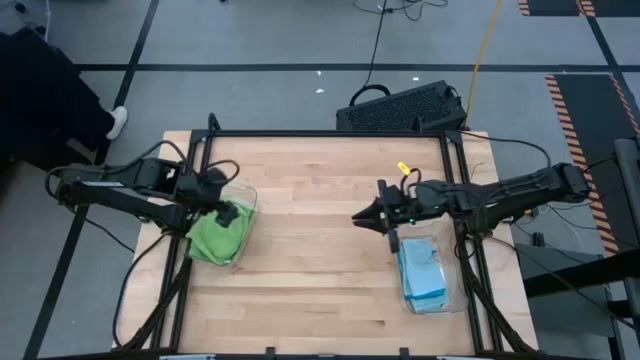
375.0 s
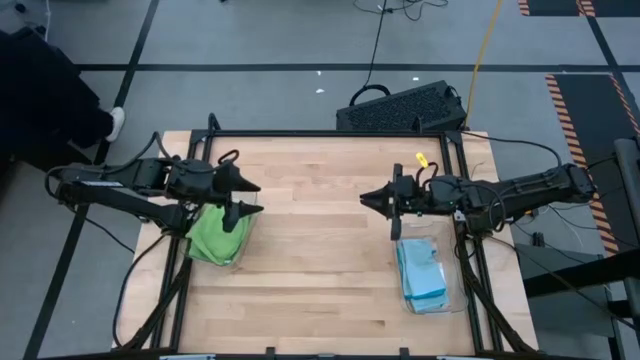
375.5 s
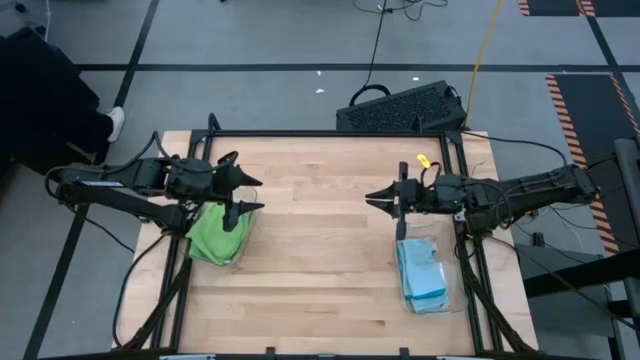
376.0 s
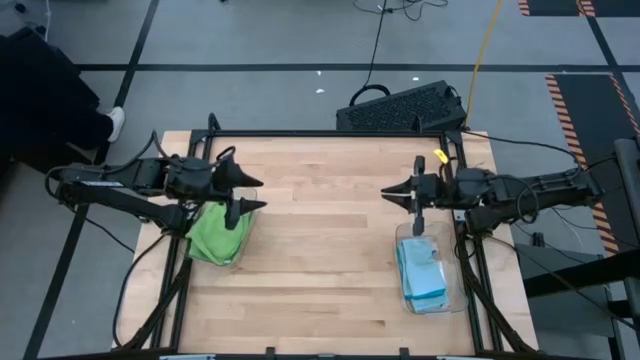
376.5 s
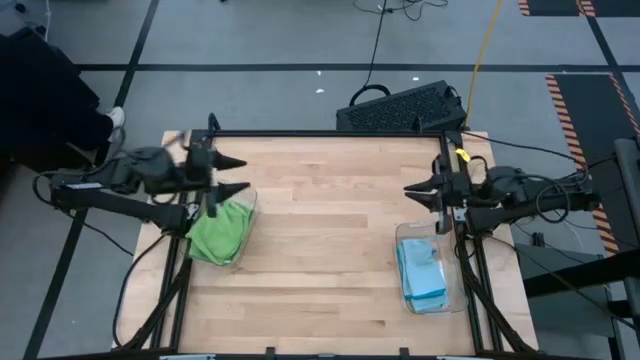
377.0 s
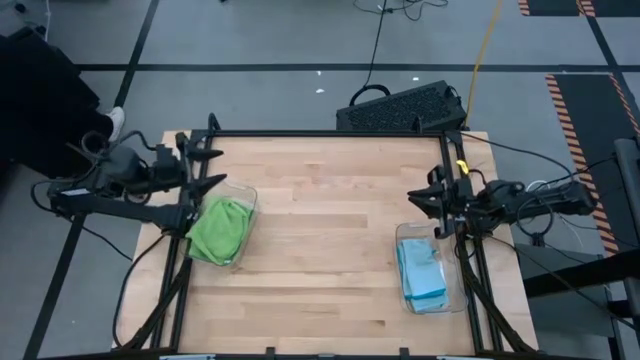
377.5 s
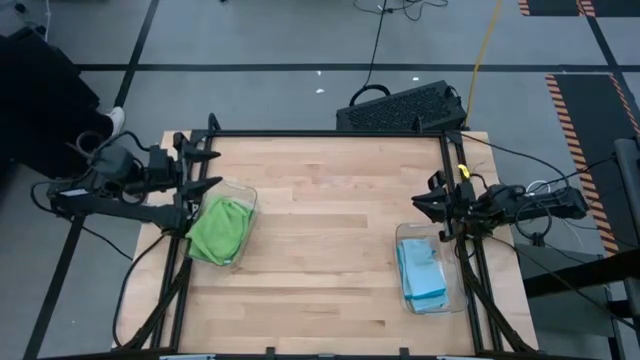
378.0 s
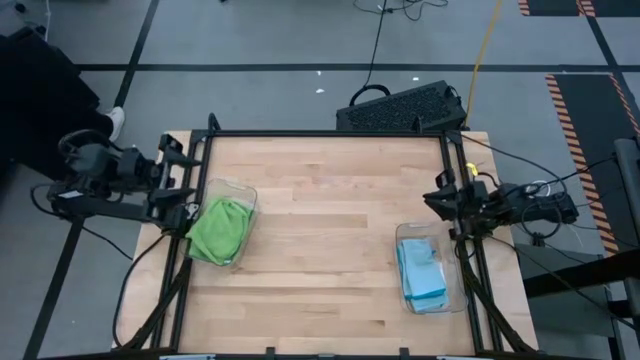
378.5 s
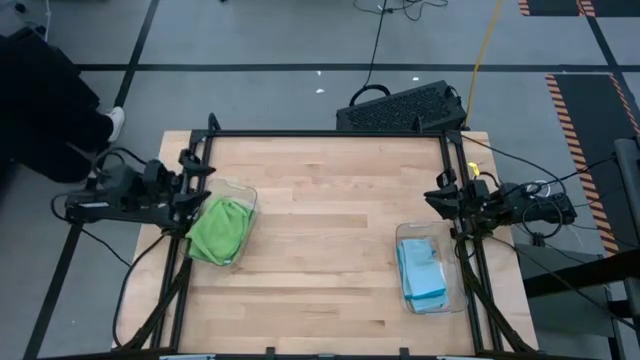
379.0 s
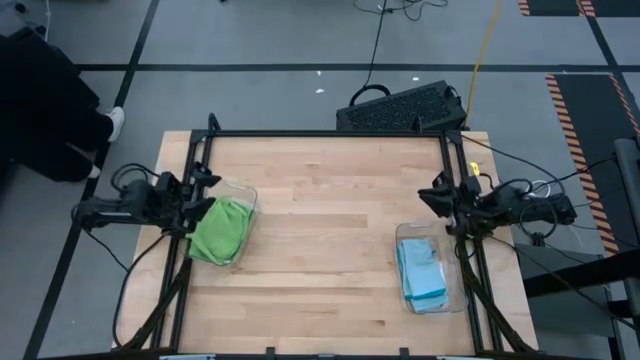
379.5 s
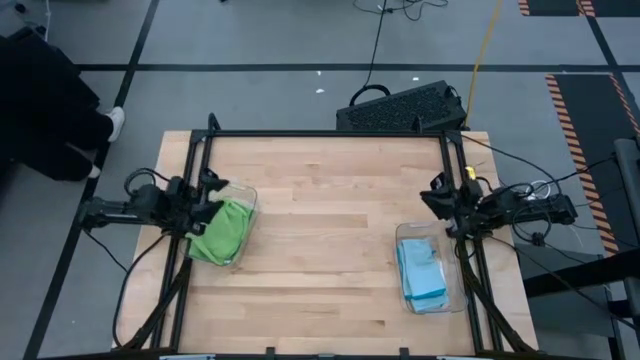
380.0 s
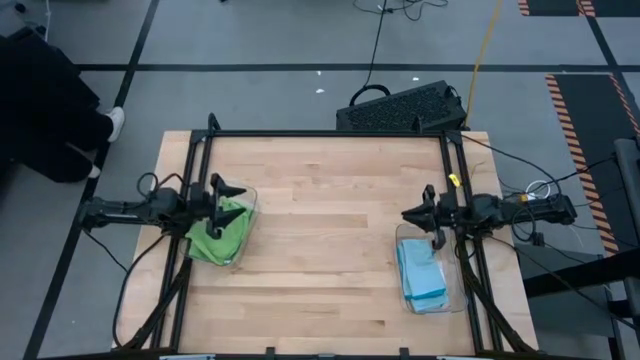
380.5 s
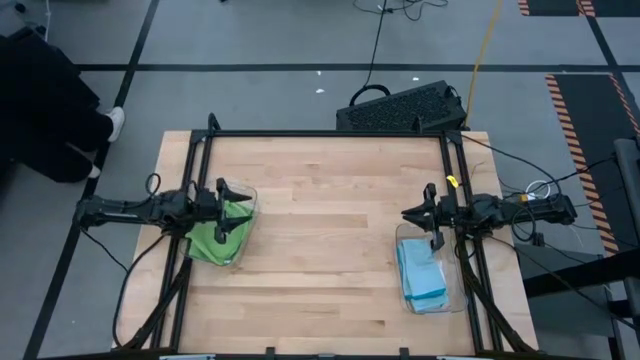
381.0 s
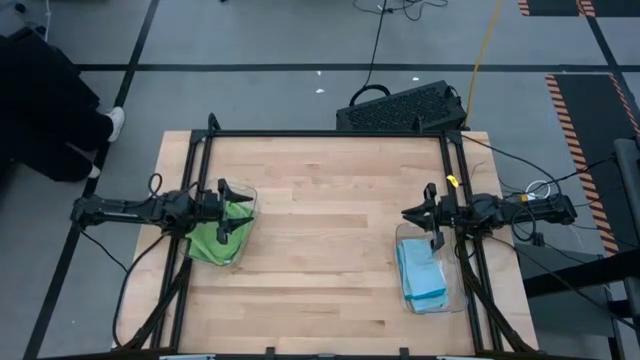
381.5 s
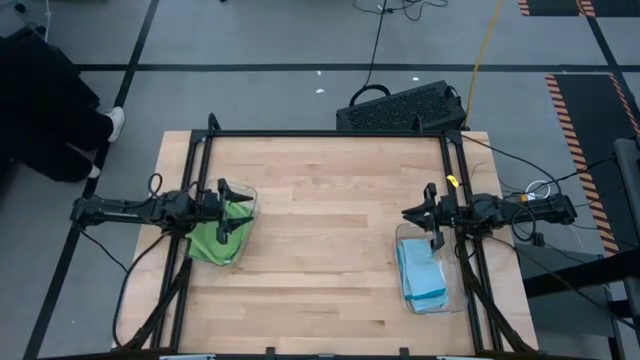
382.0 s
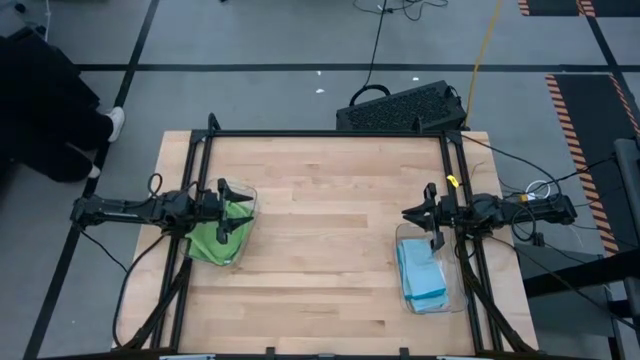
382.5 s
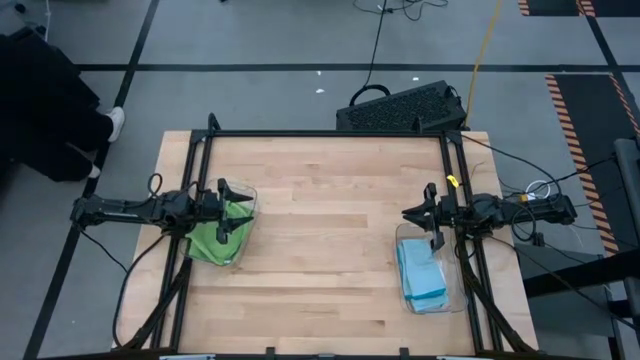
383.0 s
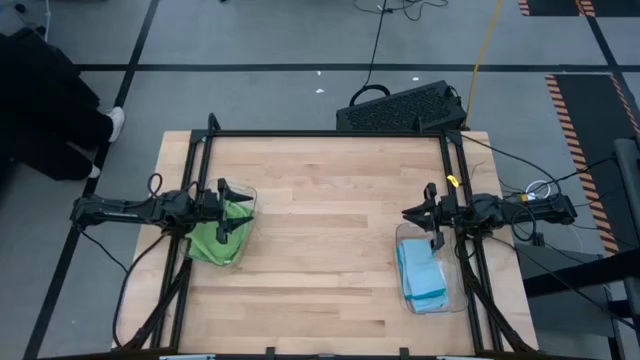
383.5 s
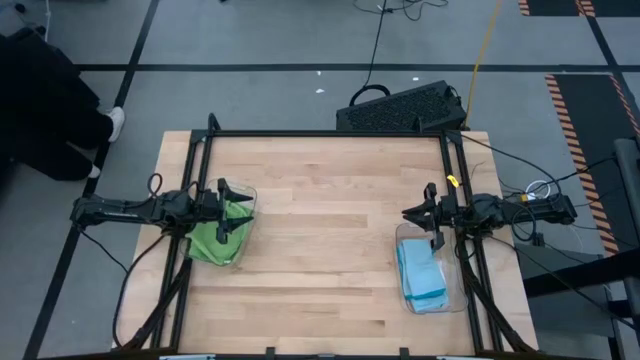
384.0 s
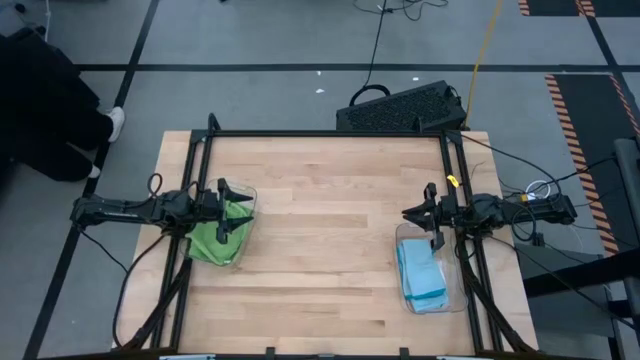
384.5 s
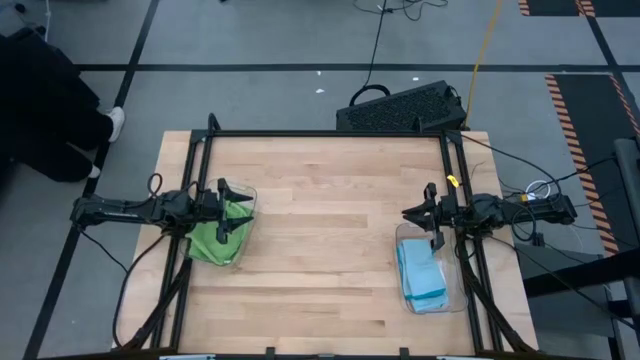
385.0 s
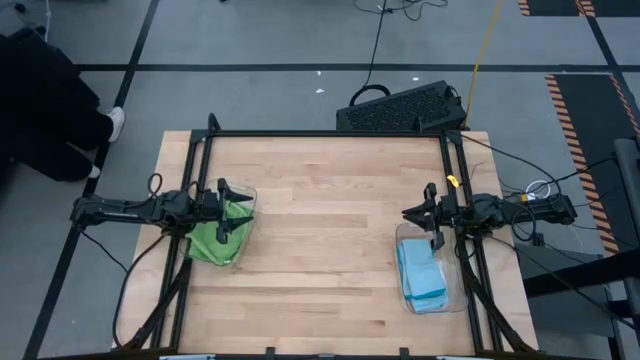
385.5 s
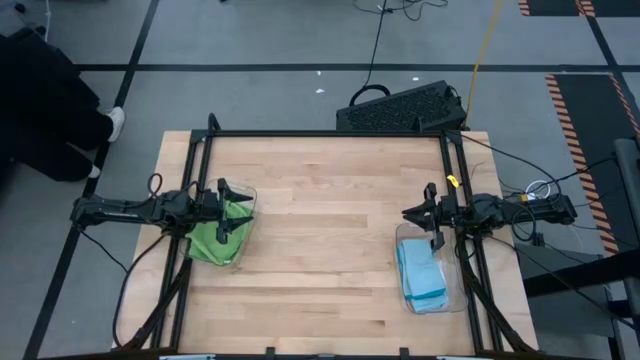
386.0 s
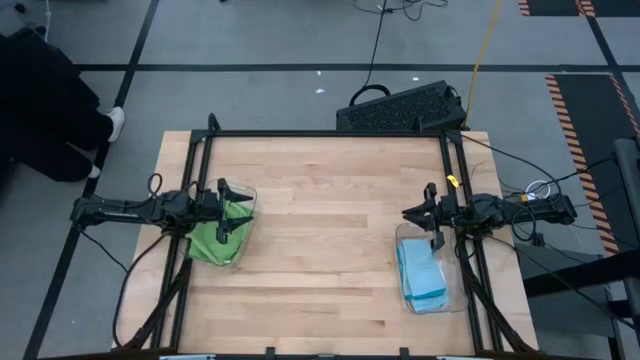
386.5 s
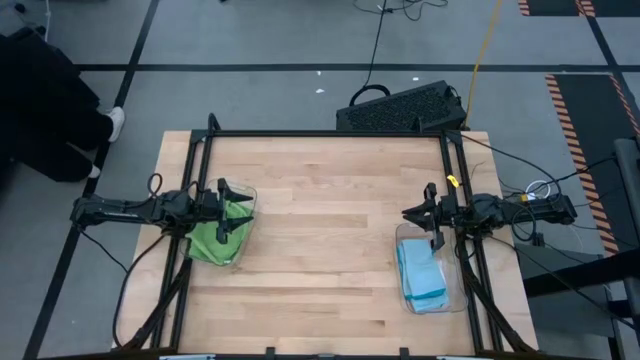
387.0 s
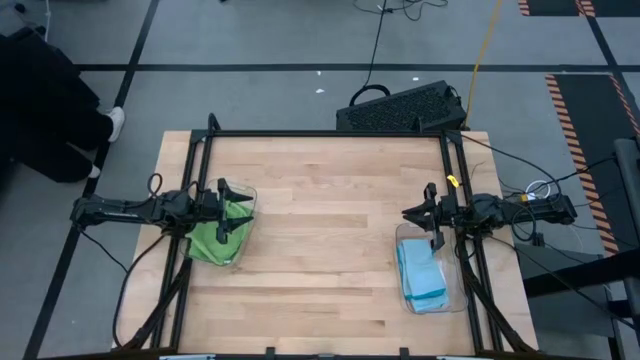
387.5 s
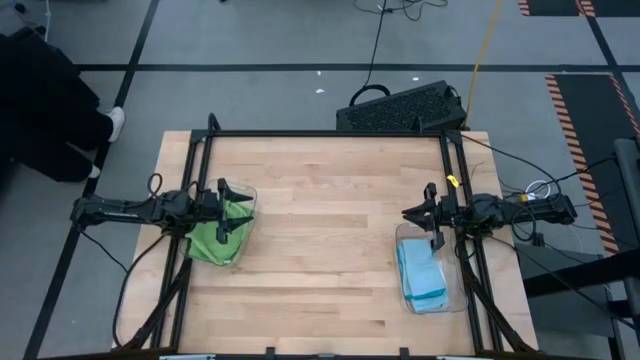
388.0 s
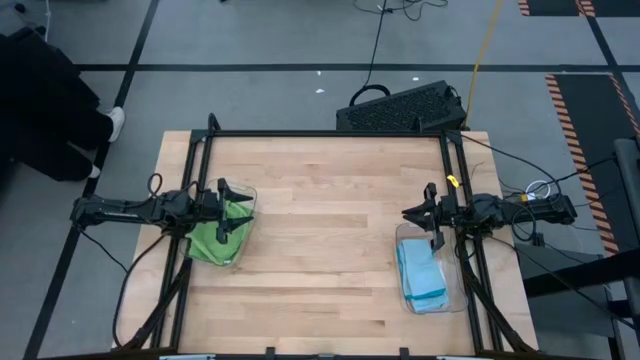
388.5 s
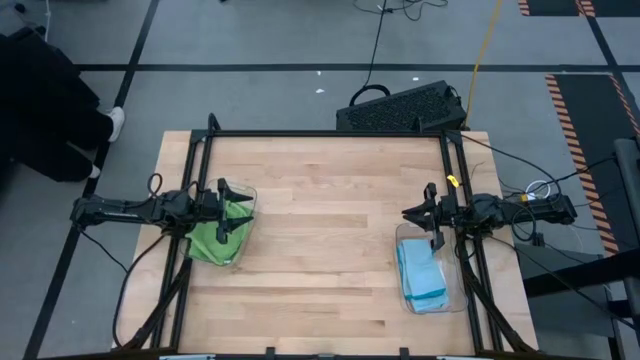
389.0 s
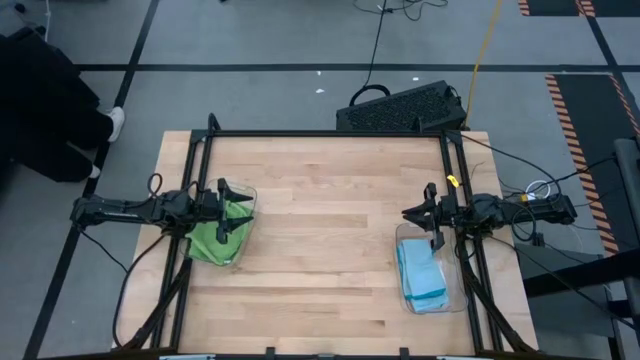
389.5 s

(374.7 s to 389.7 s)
Task: Sort microfiber towel by color & place in baskets
Return to Home Position

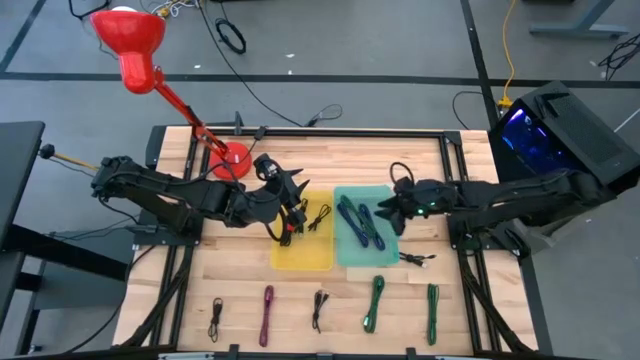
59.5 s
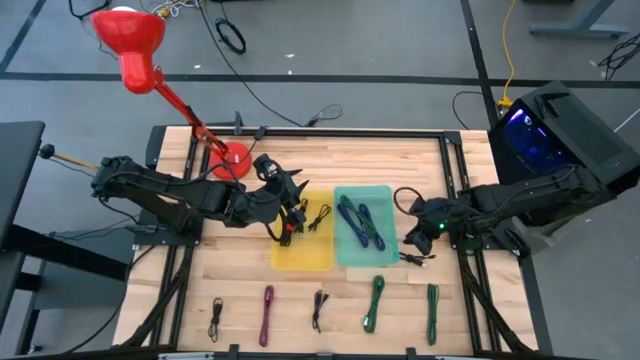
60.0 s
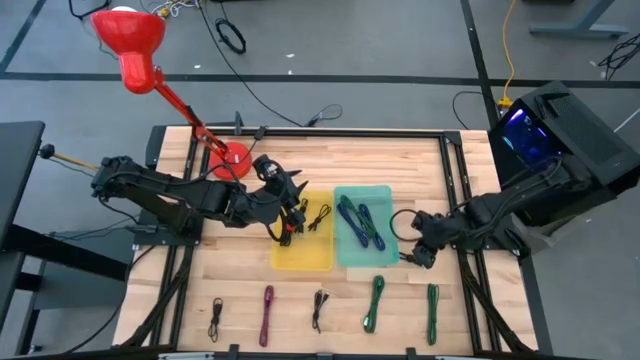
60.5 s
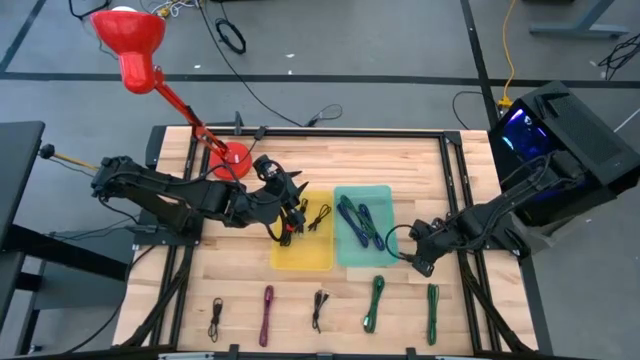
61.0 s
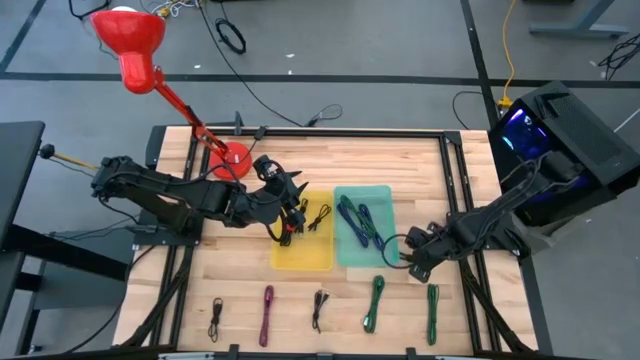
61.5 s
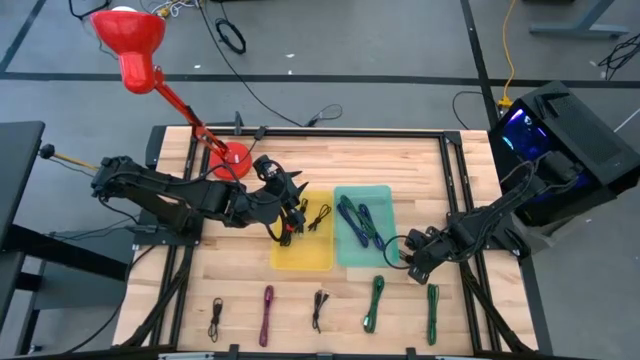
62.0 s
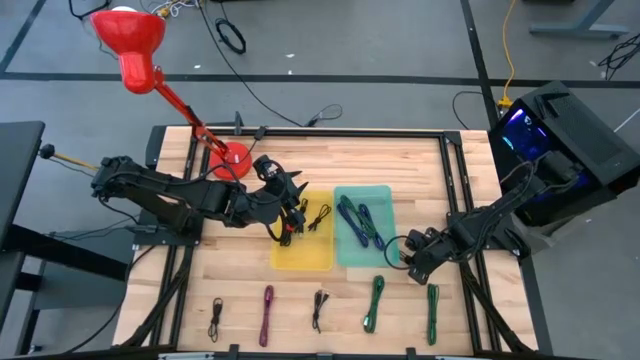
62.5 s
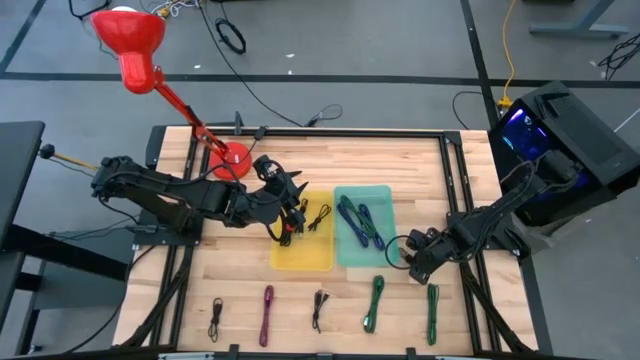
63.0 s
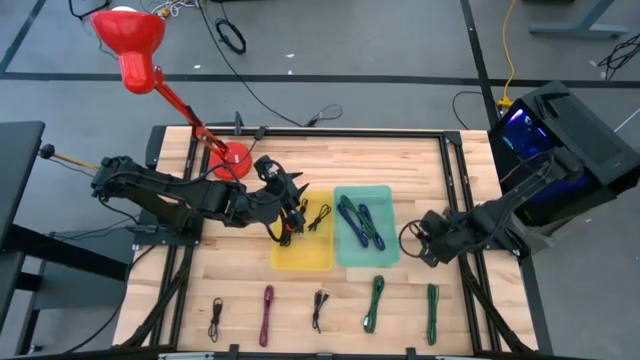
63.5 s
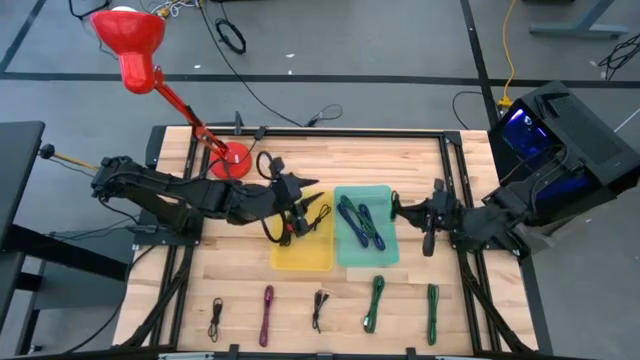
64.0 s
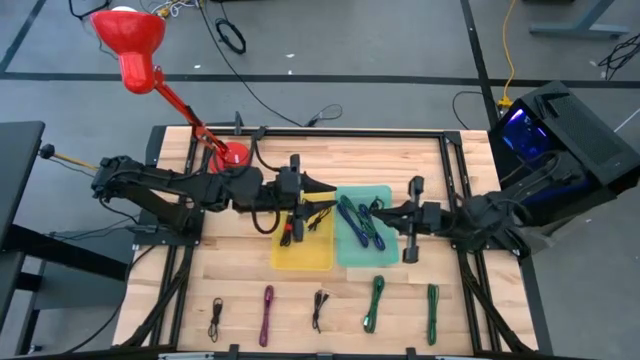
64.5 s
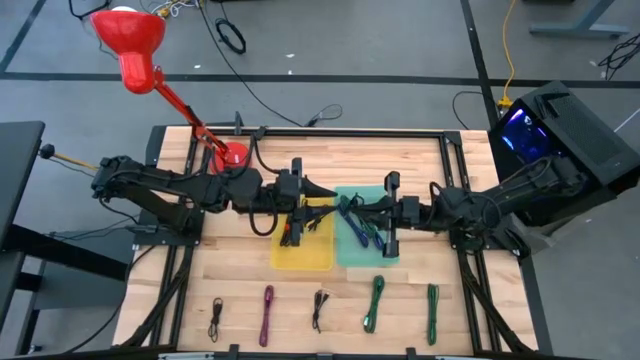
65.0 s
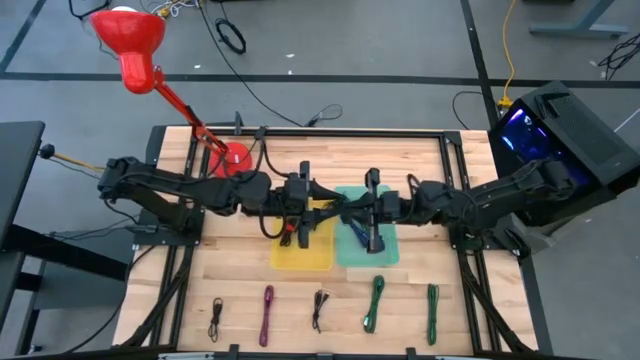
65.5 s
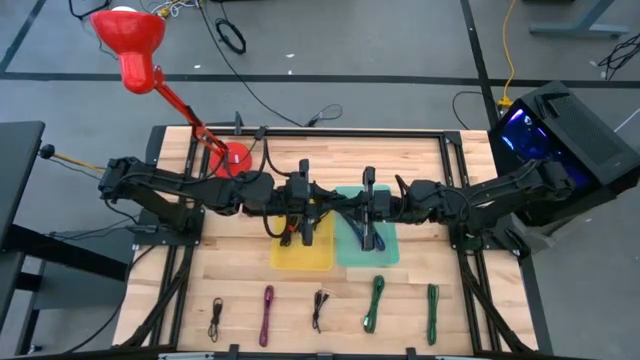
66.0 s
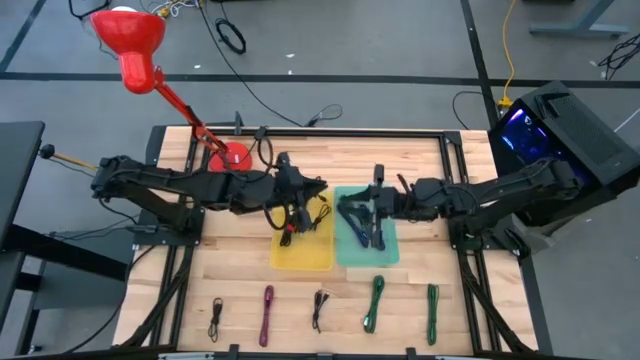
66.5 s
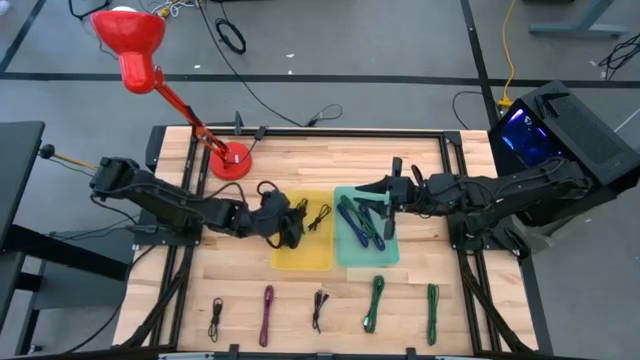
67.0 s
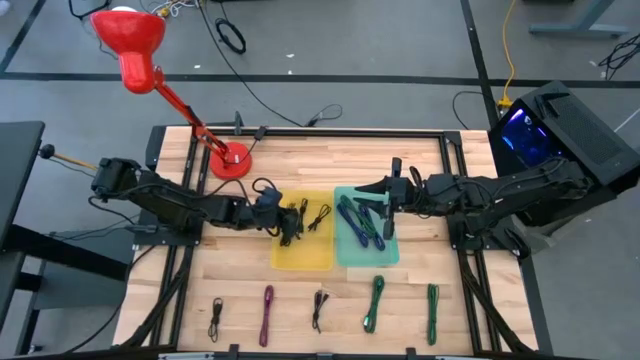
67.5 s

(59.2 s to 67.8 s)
Task: Pick & Place USB Port
Put the black charger cable into the yellow bin
